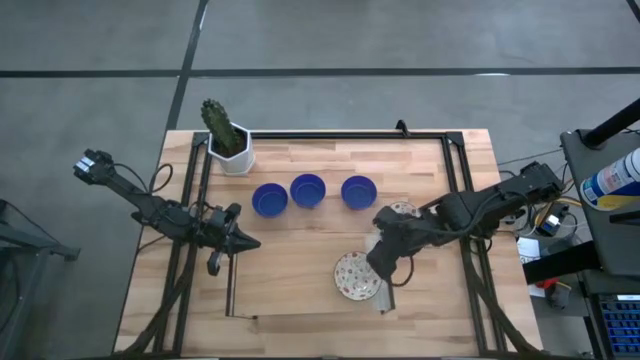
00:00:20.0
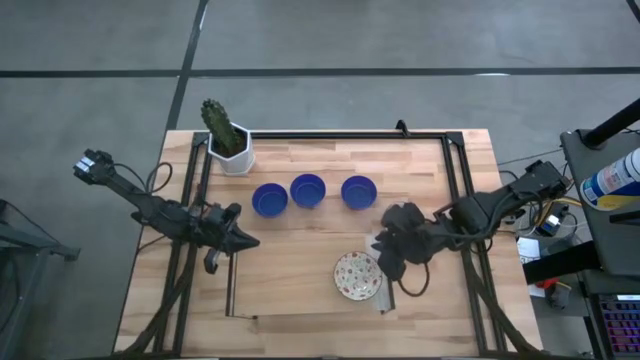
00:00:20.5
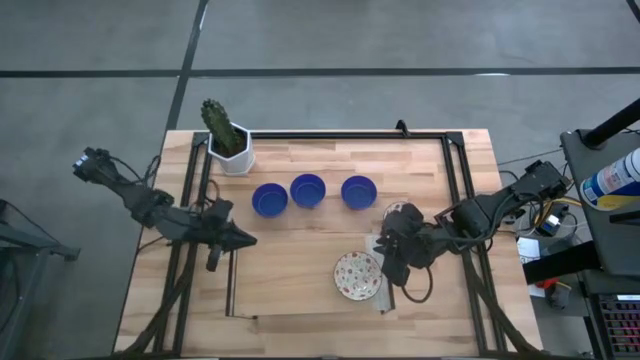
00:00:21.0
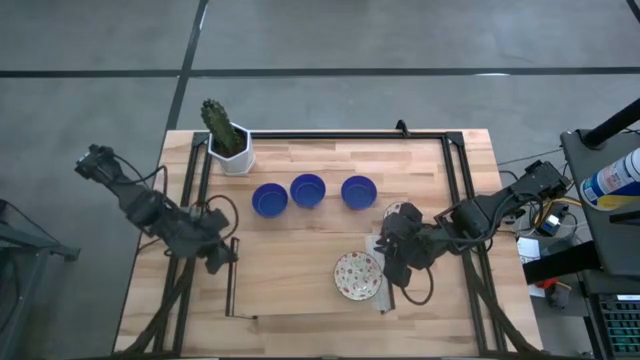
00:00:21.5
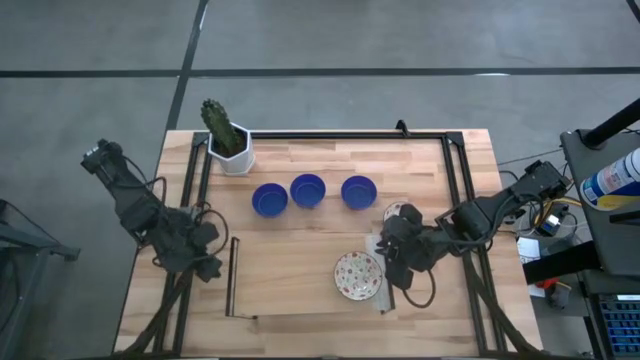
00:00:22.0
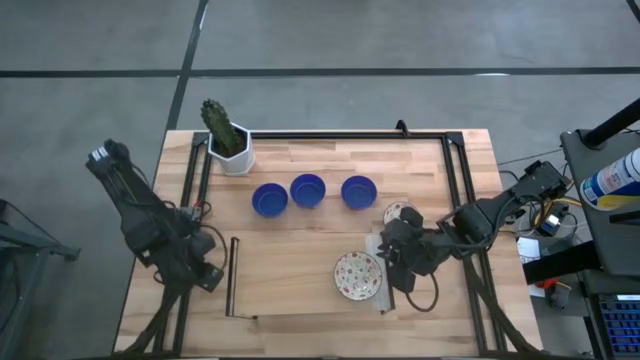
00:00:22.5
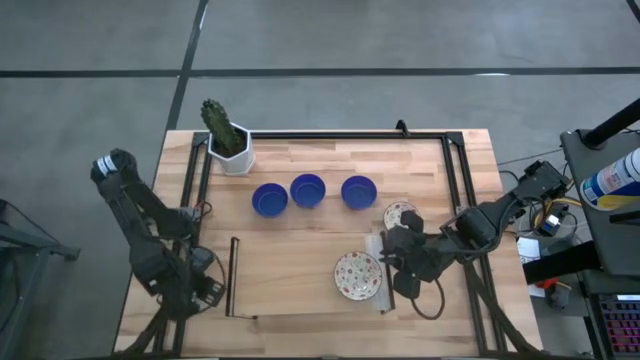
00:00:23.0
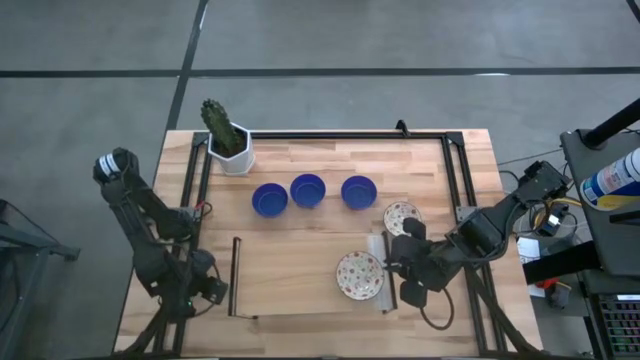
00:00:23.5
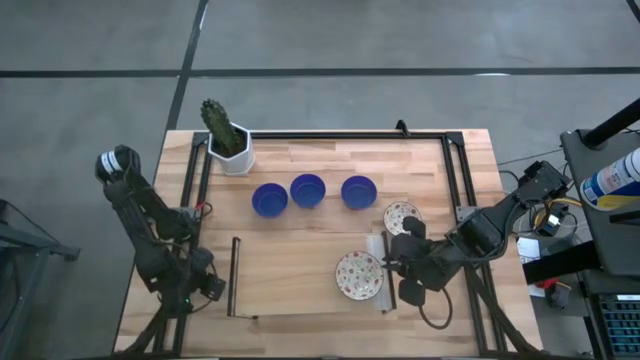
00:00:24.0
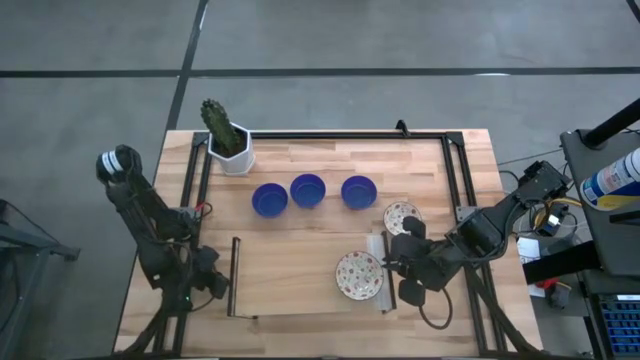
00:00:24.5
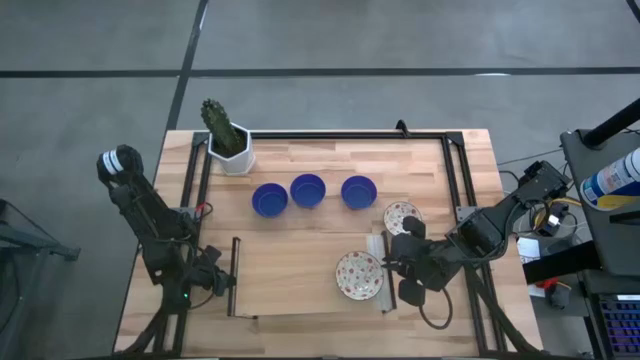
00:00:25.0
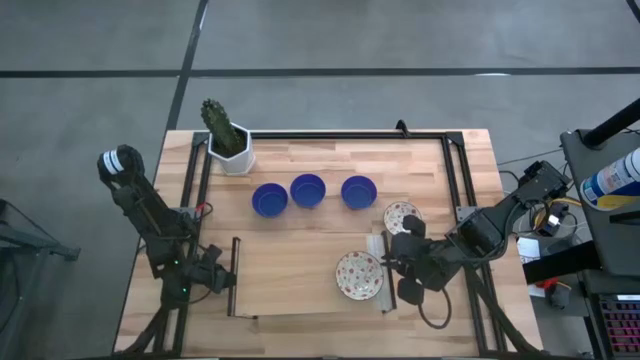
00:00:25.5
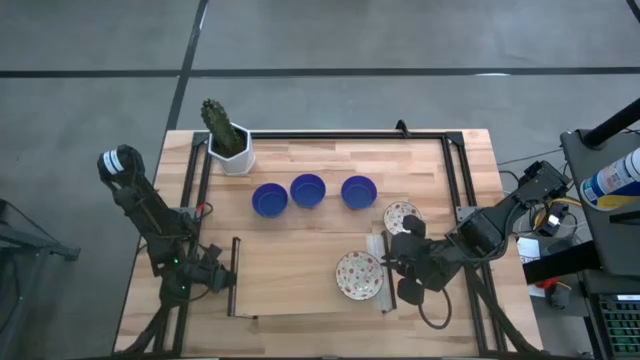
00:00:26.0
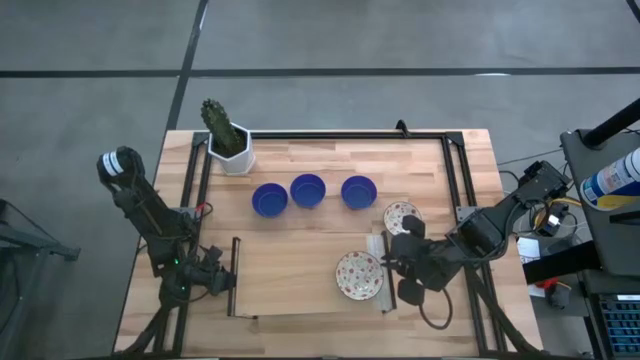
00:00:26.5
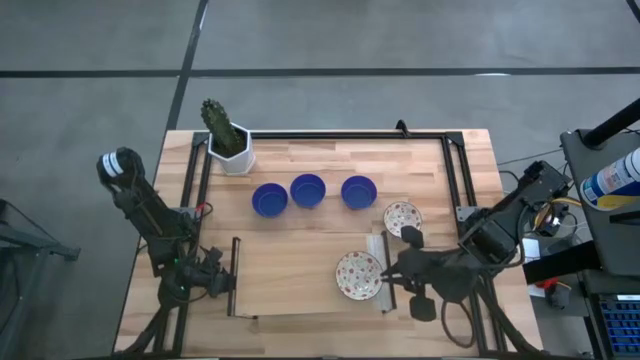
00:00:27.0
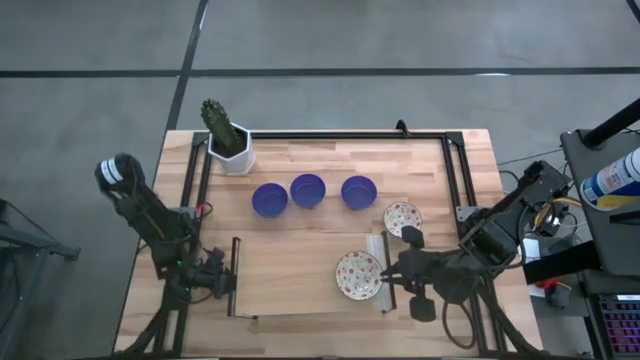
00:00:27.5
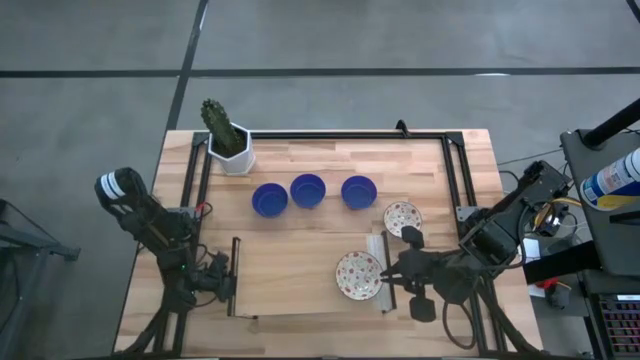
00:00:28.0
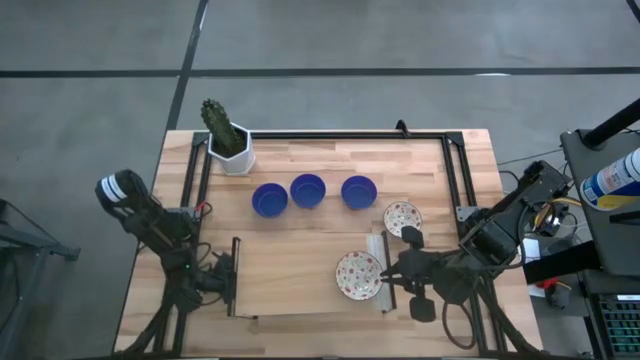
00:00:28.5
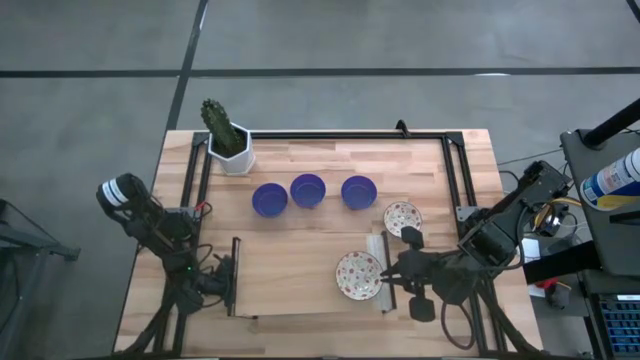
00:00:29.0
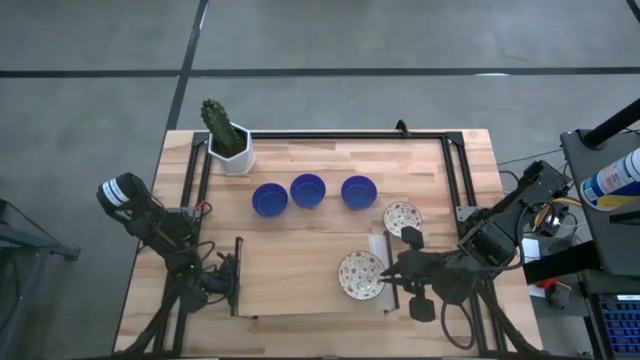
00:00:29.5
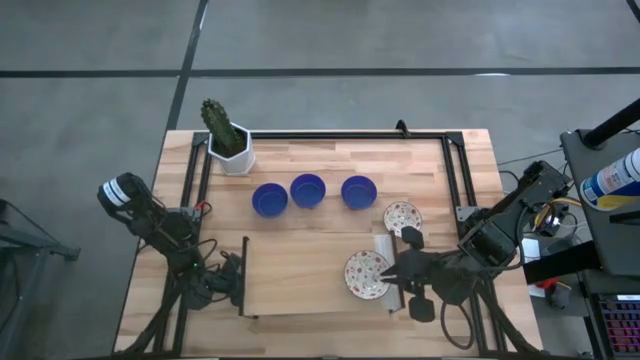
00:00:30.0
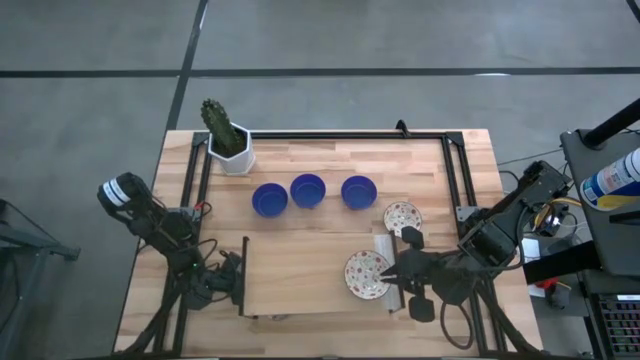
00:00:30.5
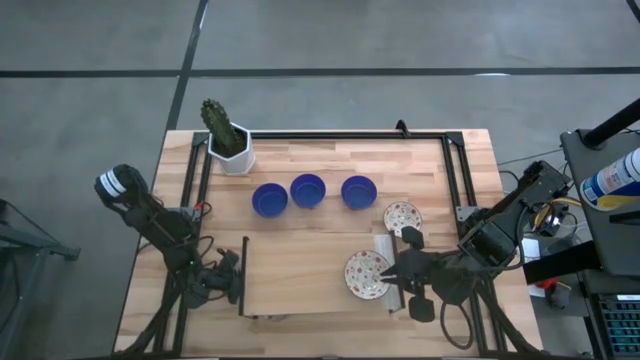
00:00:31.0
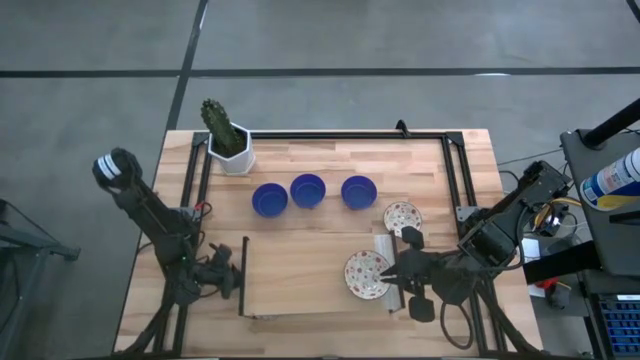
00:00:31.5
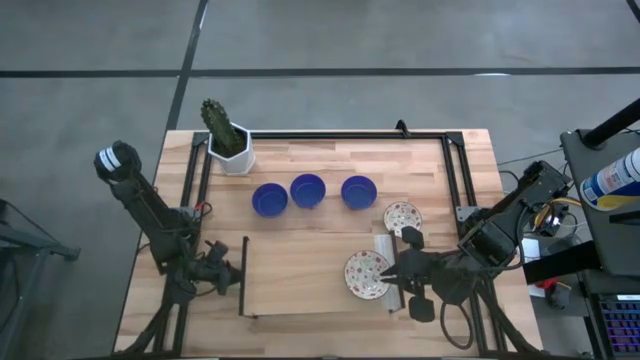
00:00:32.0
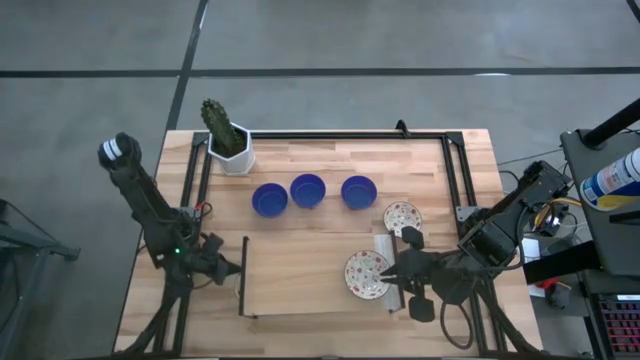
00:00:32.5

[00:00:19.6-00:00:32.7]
Task: Pick & Place Mini bowls
Stack the bottom green bowl on the green bowl on the shelf

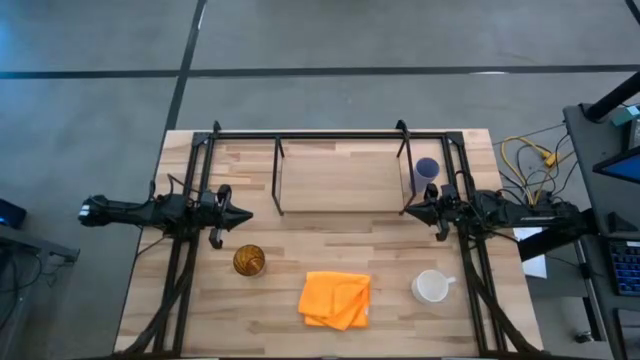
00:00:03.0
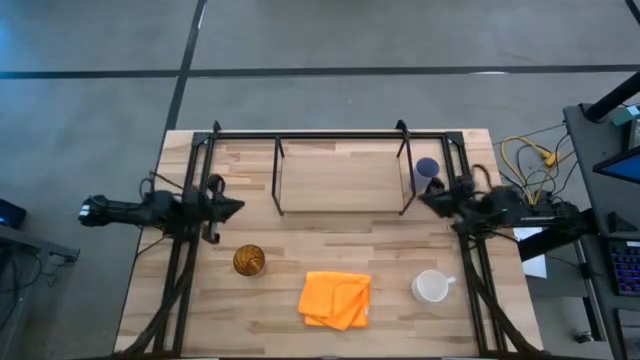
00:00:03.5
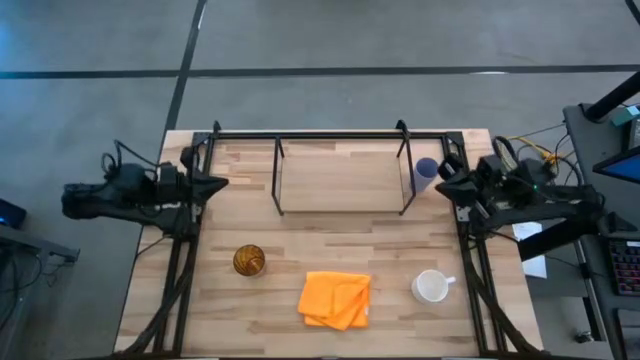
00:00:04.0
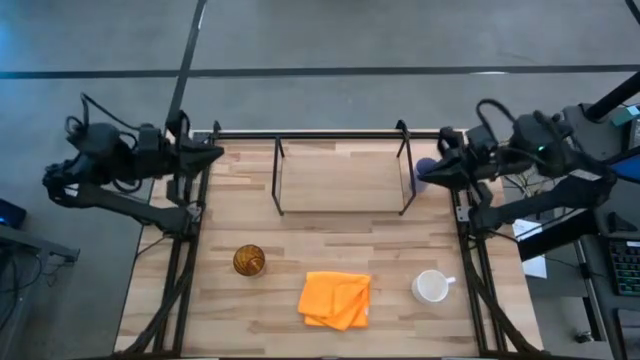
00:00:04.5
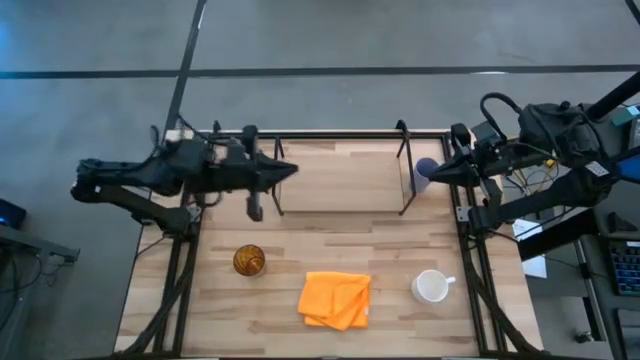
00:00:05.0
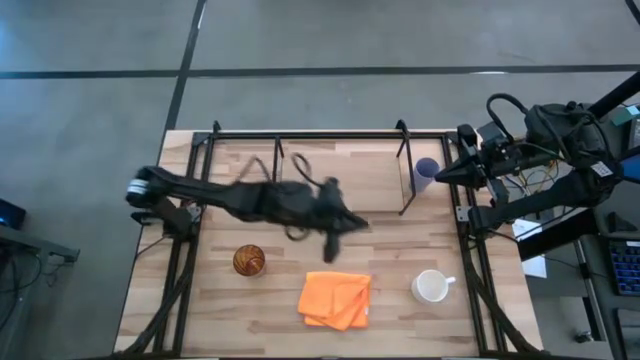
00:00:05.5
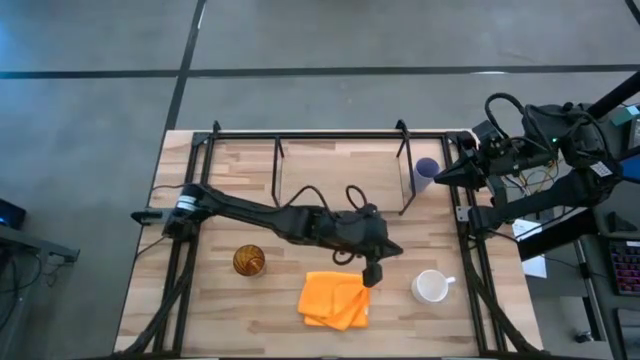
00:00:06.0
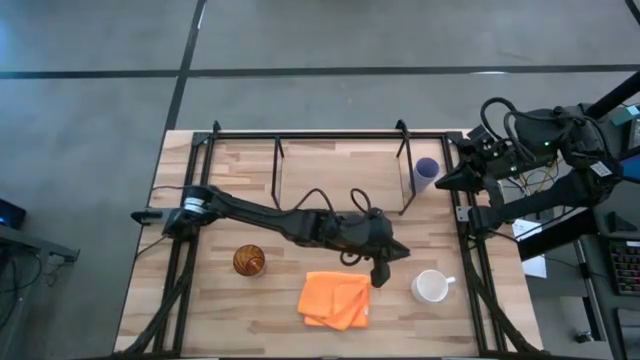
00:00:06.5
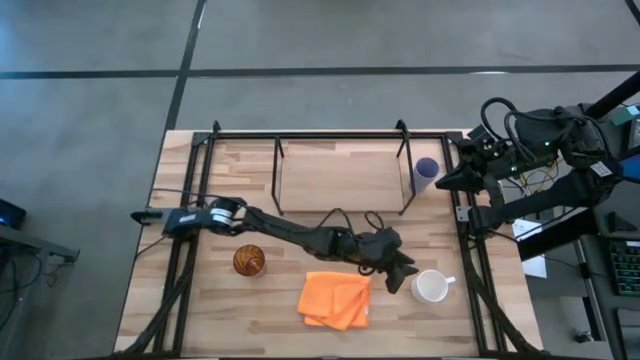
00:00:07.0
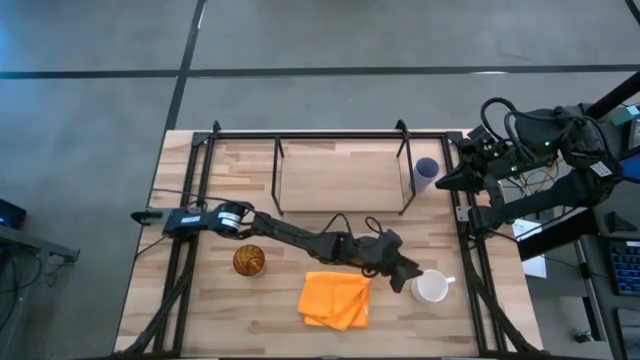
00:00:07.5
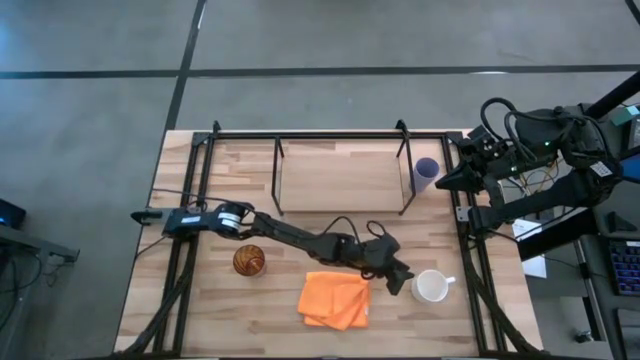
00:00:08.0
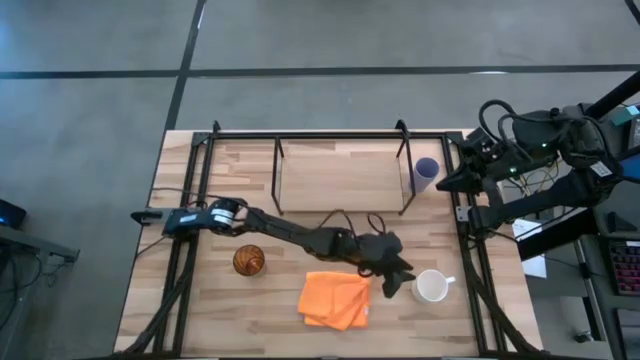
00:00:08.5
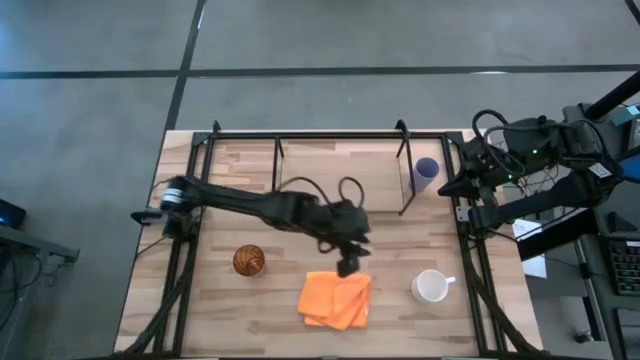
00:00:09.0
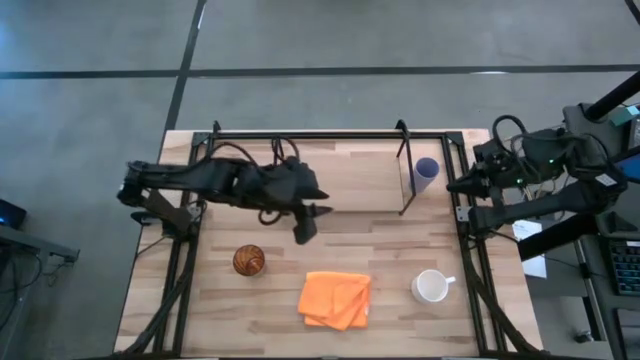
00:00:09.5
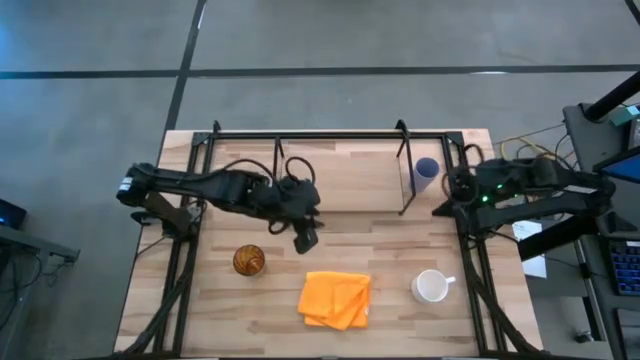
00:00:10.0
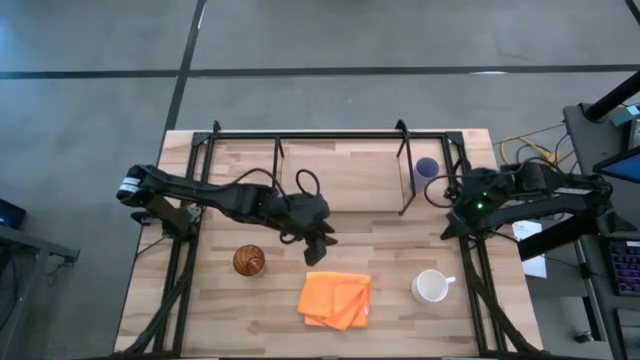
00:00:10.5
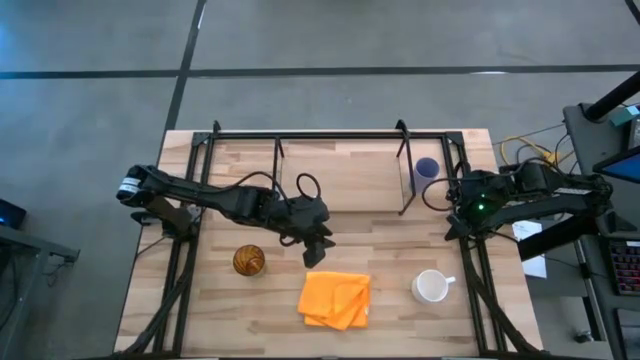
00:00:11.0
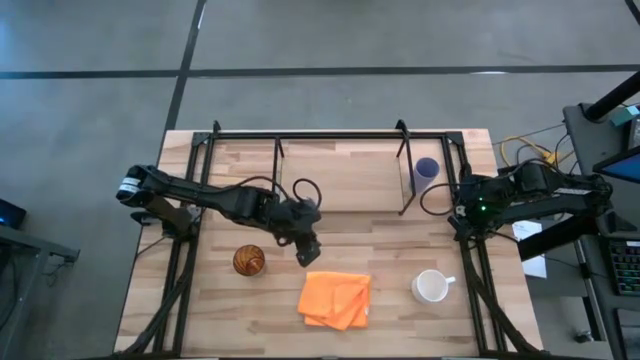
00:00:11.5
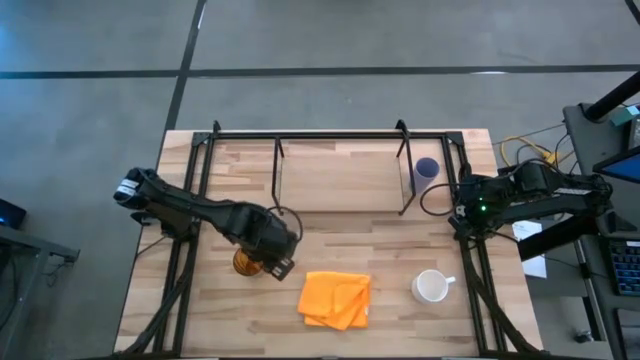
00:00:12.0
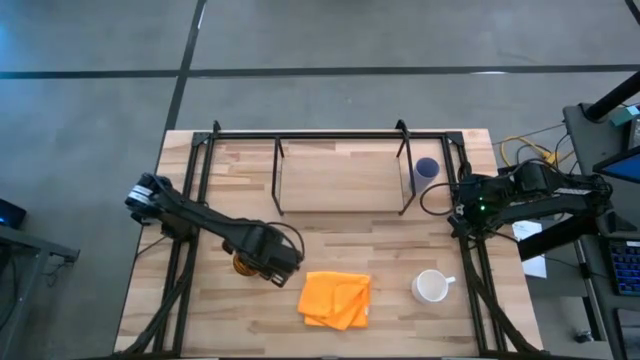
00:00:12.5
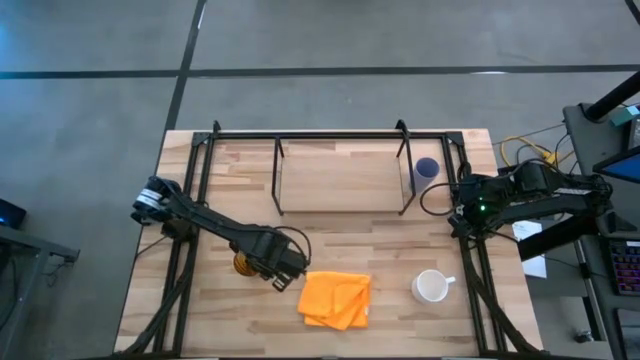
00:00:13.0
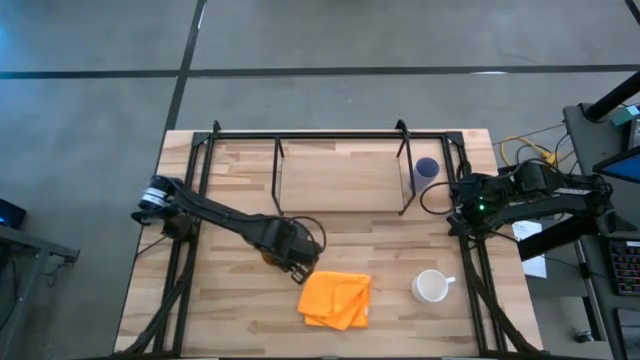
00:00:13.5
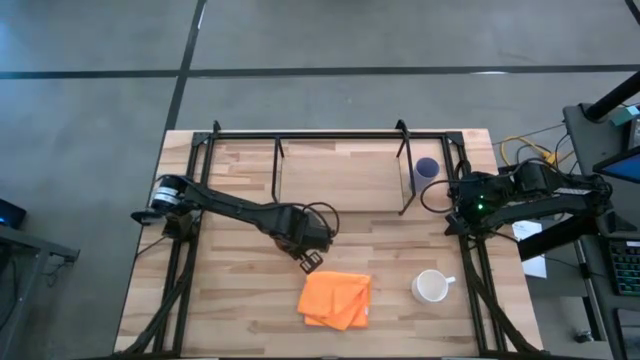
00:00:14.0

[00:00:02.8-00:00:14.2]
Task: Stack small to large cups/mugs on shelf
Adjust the brown cup
